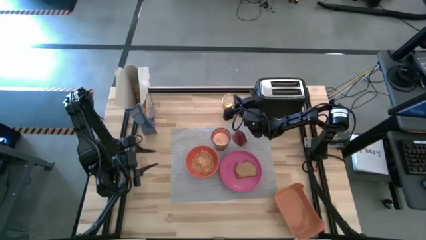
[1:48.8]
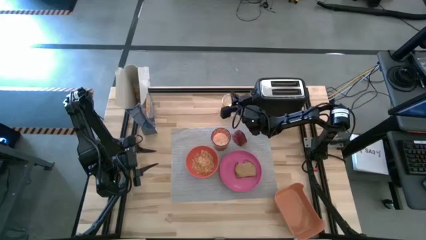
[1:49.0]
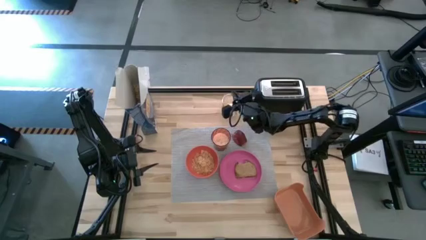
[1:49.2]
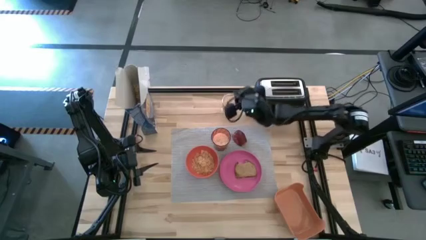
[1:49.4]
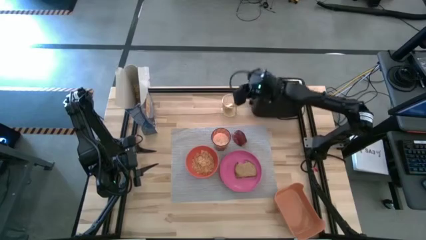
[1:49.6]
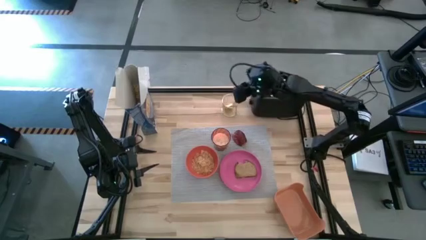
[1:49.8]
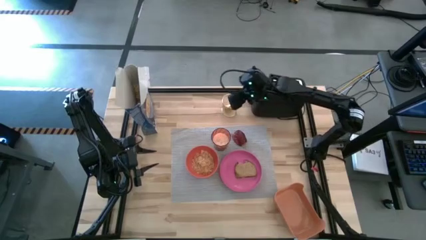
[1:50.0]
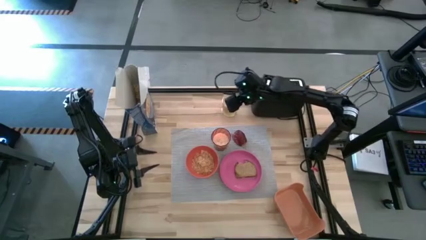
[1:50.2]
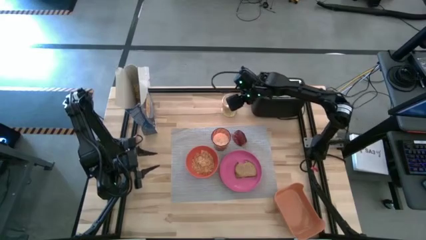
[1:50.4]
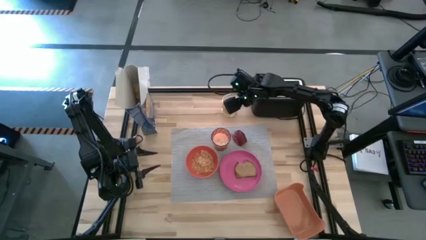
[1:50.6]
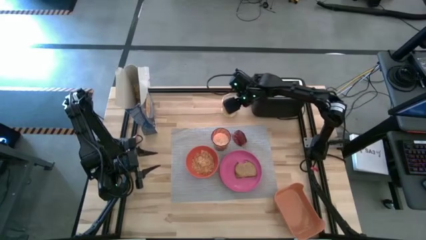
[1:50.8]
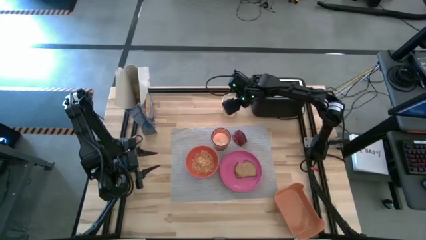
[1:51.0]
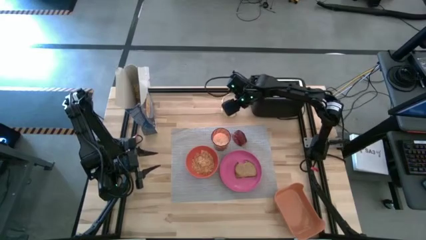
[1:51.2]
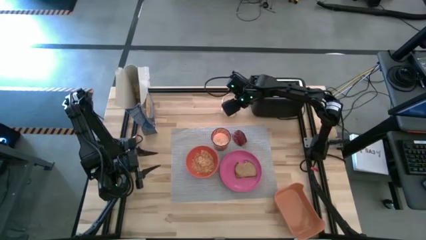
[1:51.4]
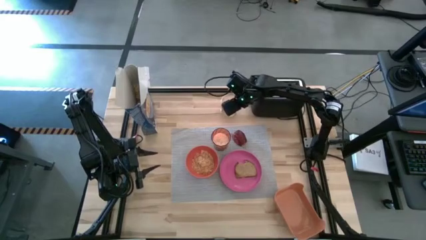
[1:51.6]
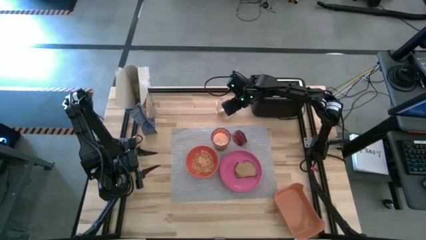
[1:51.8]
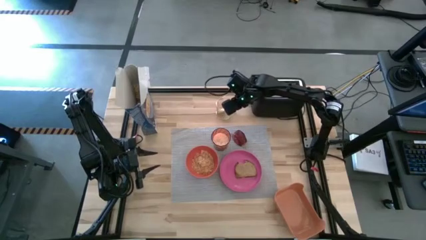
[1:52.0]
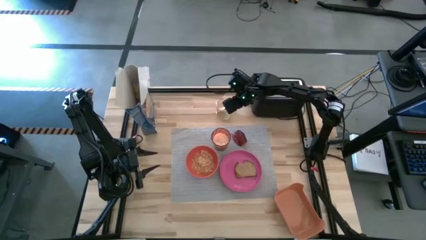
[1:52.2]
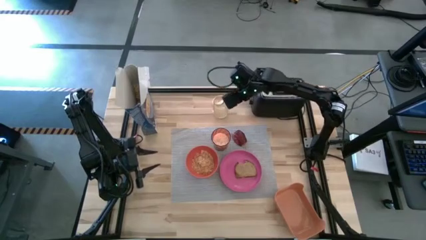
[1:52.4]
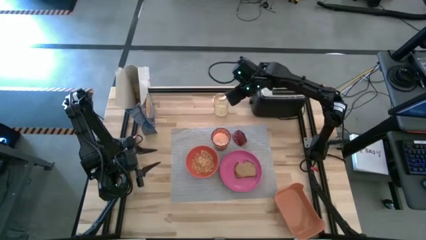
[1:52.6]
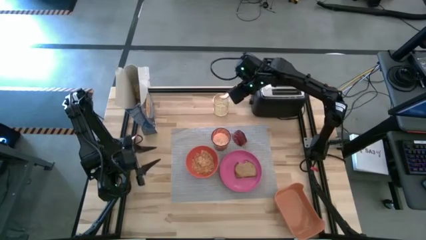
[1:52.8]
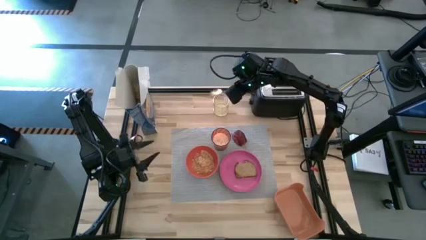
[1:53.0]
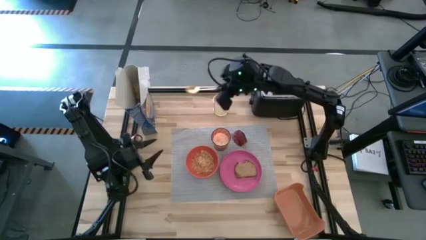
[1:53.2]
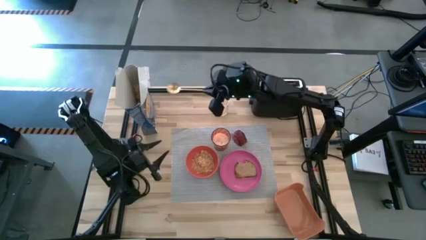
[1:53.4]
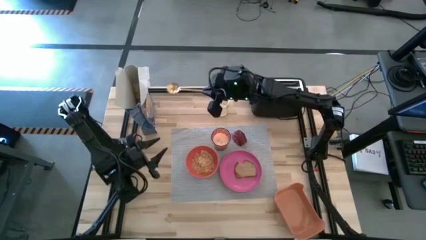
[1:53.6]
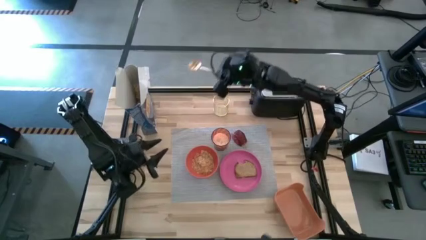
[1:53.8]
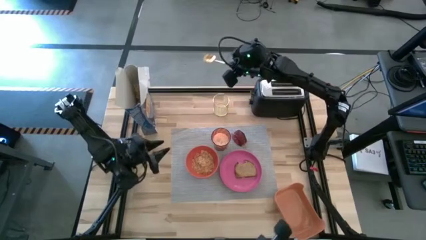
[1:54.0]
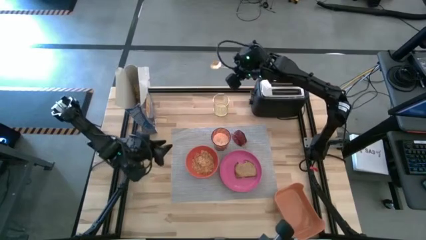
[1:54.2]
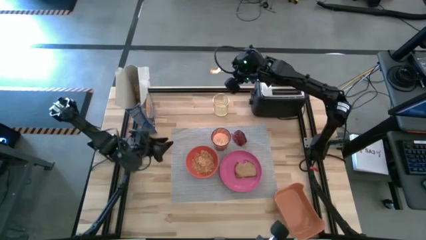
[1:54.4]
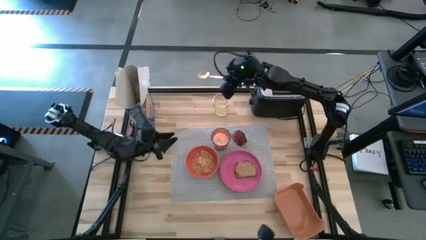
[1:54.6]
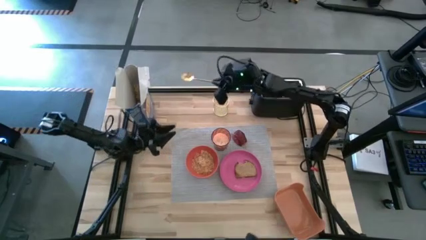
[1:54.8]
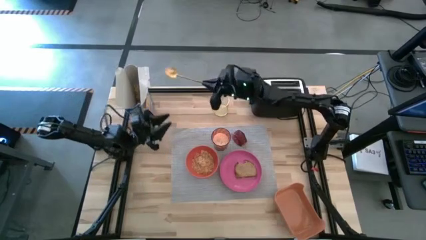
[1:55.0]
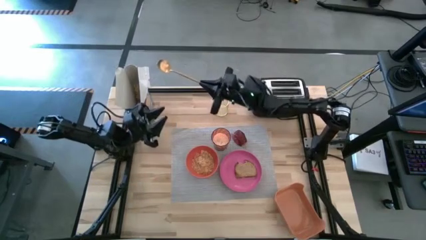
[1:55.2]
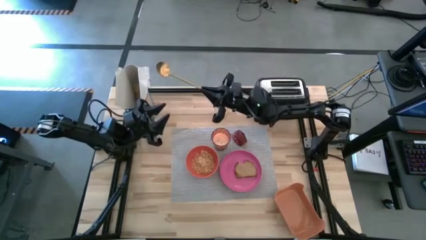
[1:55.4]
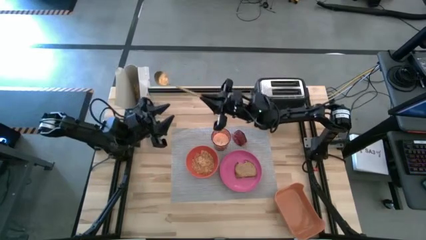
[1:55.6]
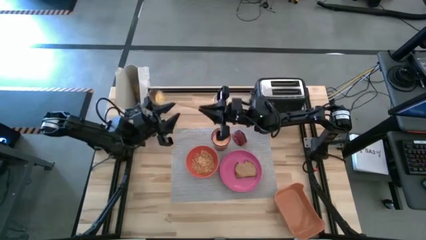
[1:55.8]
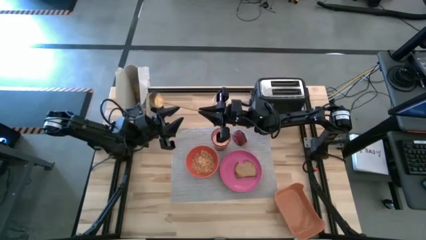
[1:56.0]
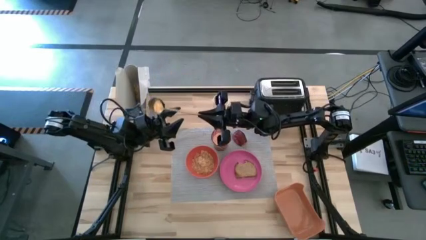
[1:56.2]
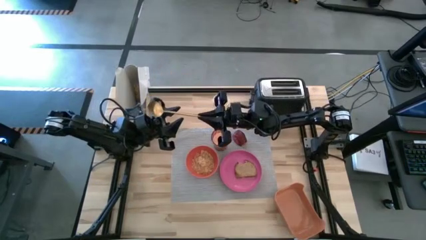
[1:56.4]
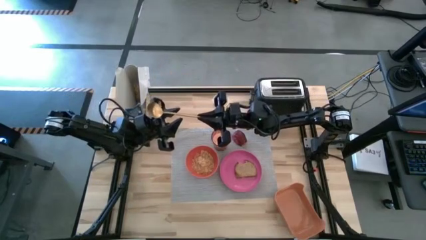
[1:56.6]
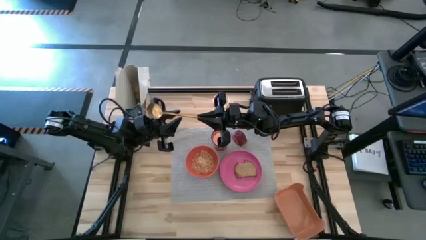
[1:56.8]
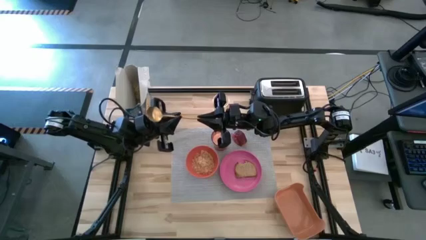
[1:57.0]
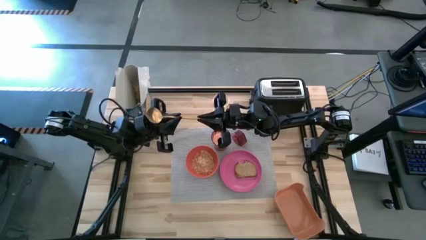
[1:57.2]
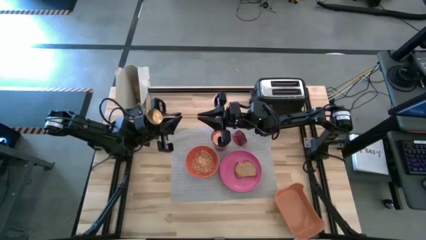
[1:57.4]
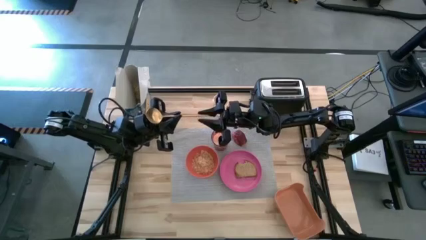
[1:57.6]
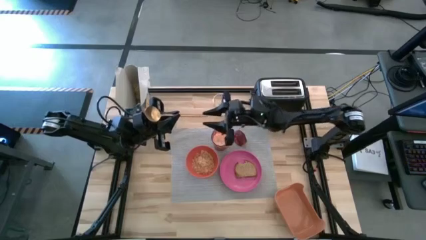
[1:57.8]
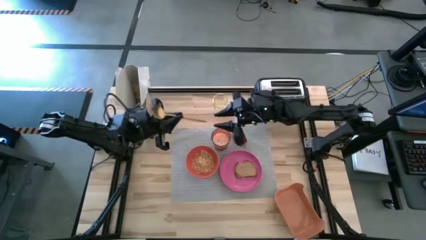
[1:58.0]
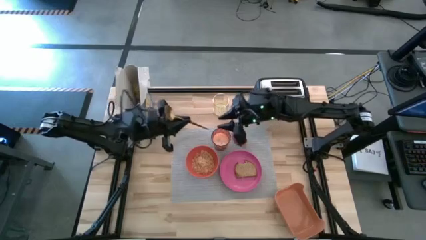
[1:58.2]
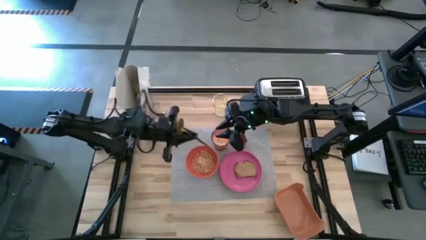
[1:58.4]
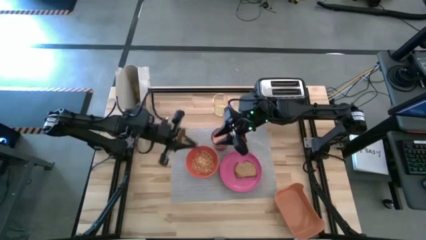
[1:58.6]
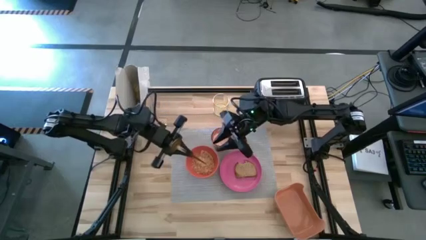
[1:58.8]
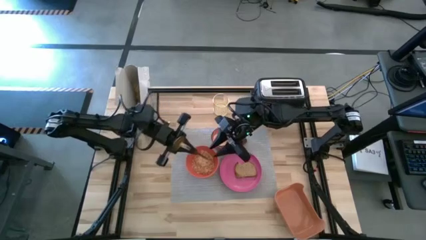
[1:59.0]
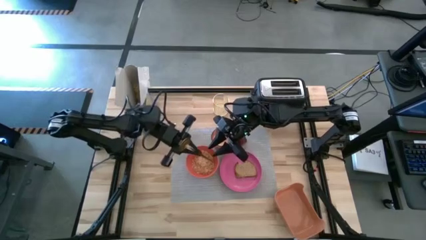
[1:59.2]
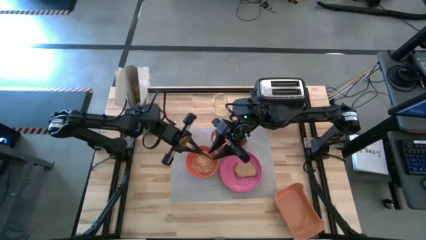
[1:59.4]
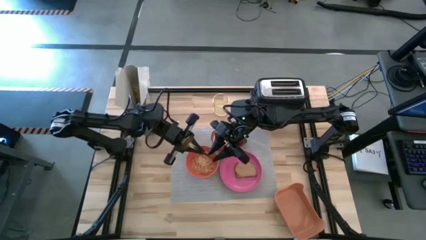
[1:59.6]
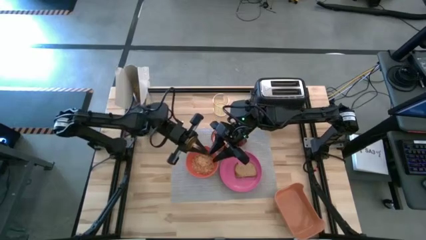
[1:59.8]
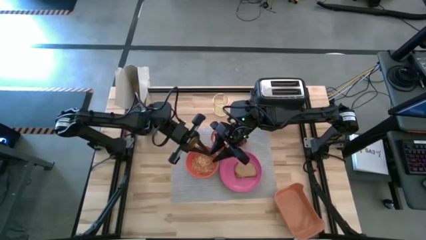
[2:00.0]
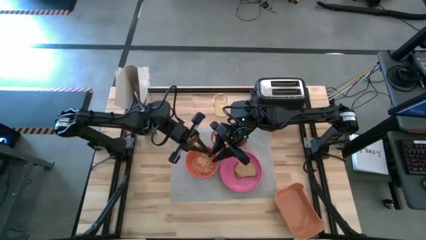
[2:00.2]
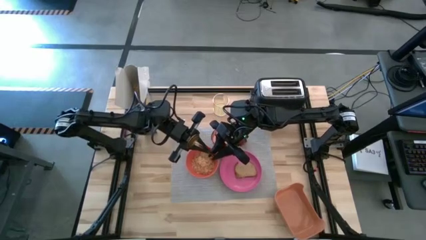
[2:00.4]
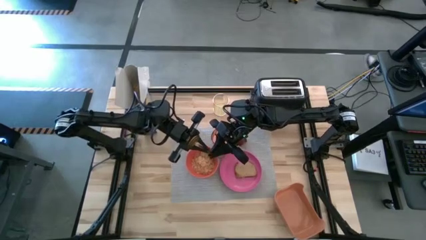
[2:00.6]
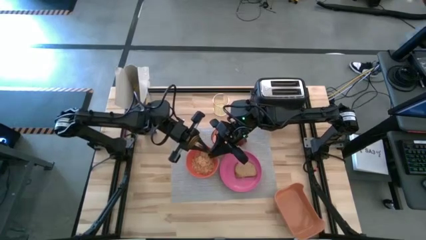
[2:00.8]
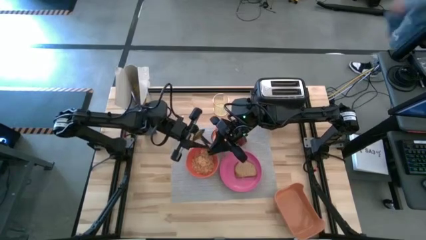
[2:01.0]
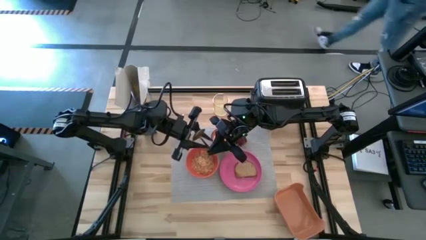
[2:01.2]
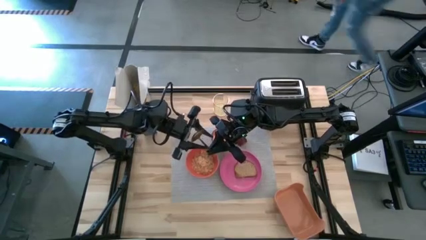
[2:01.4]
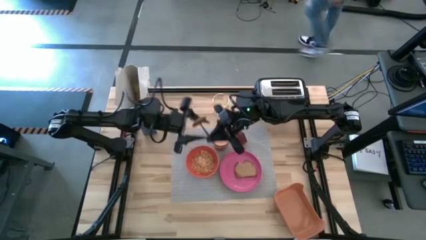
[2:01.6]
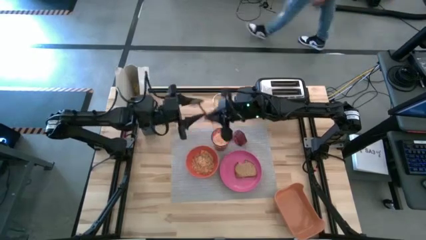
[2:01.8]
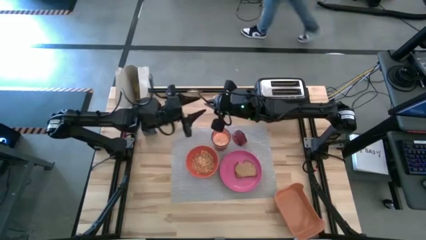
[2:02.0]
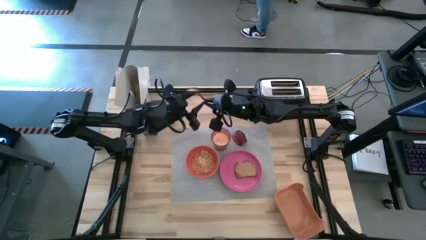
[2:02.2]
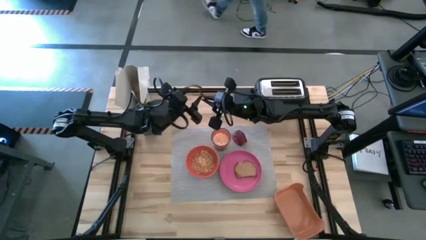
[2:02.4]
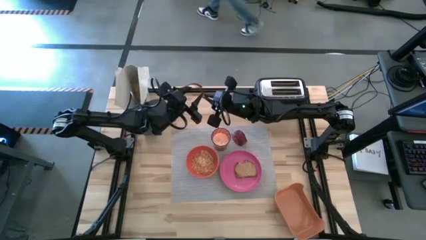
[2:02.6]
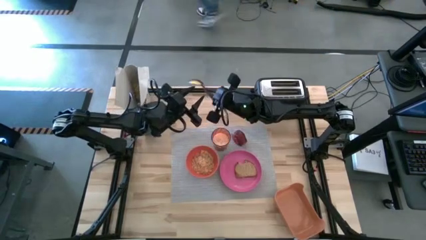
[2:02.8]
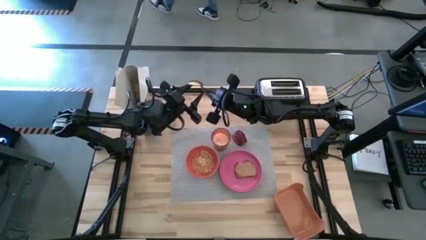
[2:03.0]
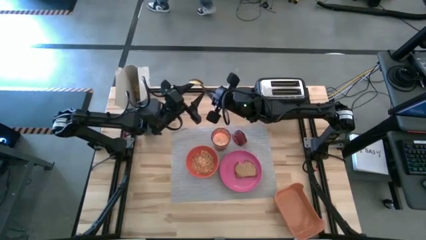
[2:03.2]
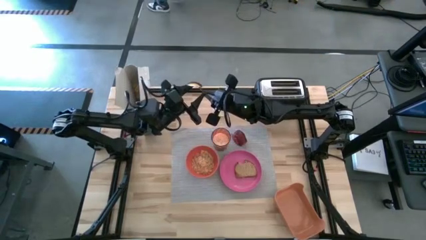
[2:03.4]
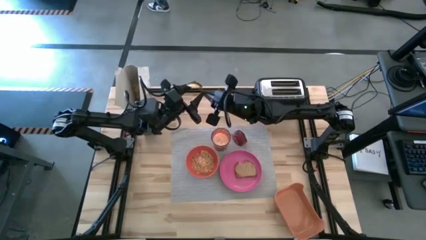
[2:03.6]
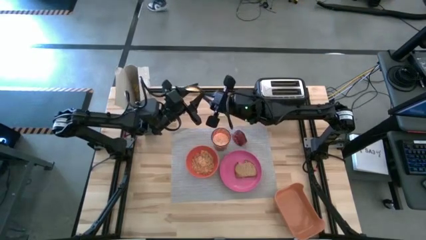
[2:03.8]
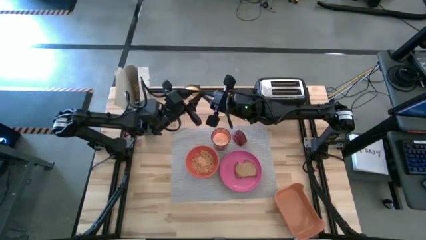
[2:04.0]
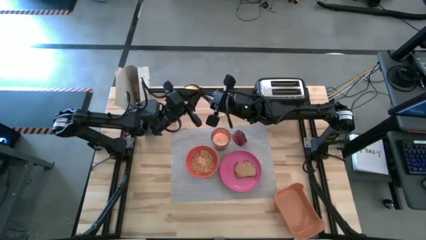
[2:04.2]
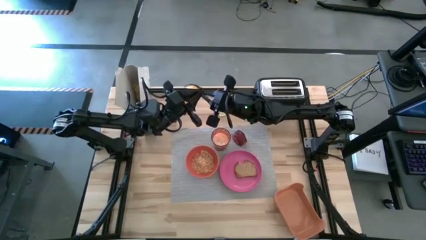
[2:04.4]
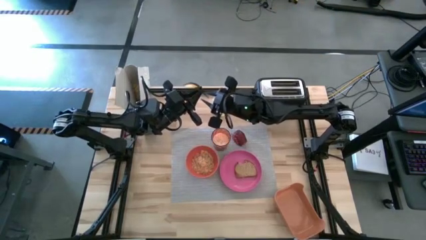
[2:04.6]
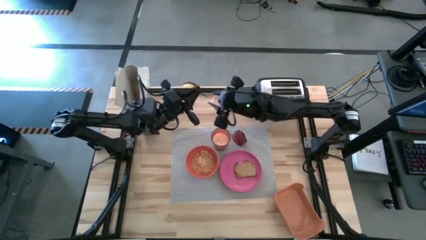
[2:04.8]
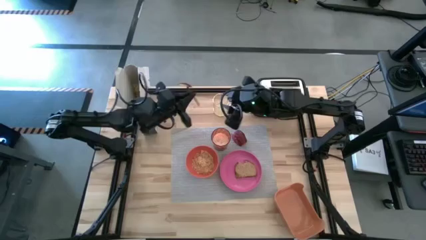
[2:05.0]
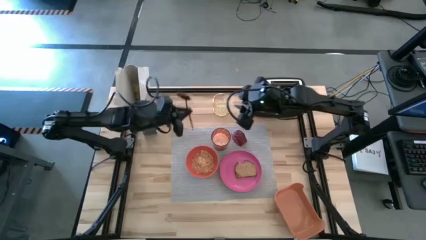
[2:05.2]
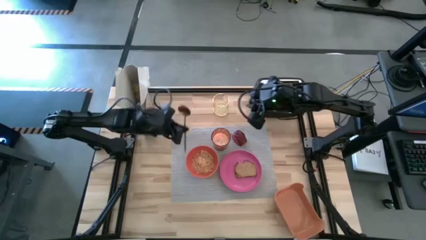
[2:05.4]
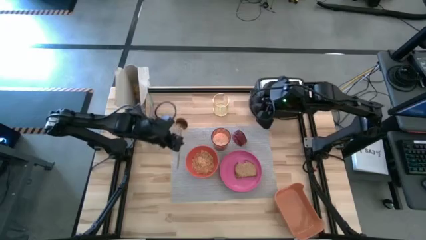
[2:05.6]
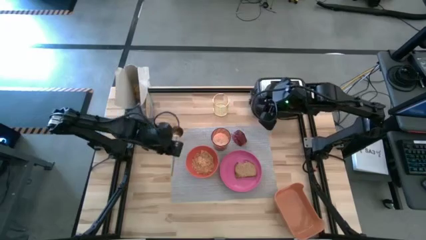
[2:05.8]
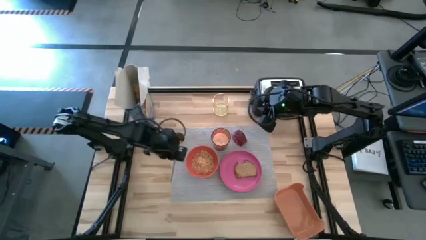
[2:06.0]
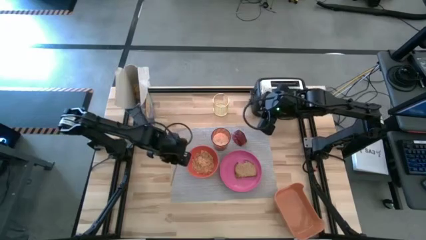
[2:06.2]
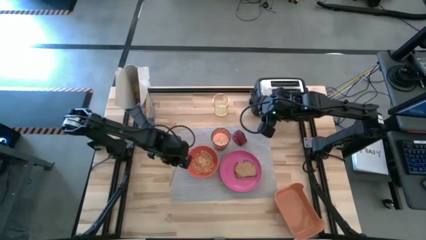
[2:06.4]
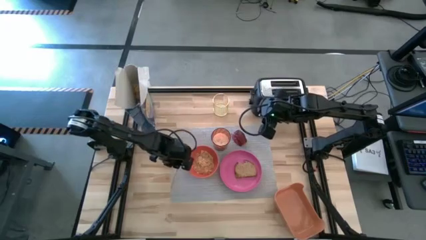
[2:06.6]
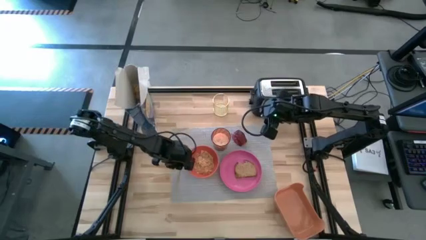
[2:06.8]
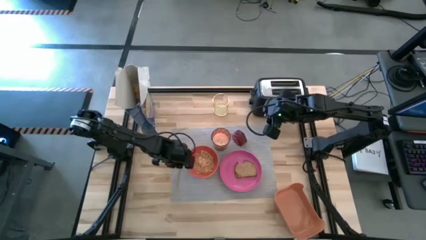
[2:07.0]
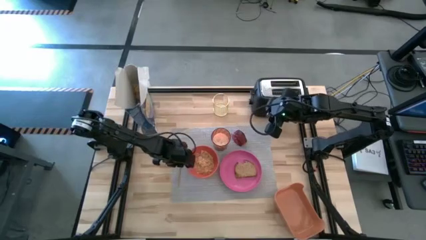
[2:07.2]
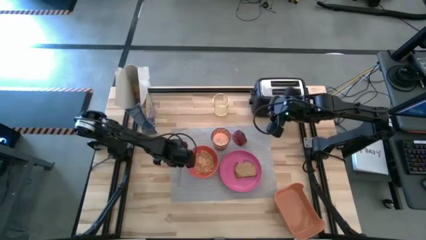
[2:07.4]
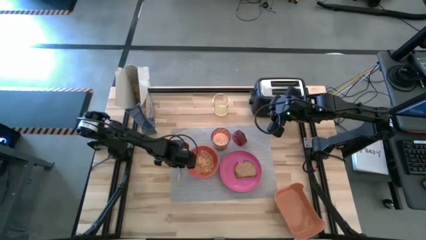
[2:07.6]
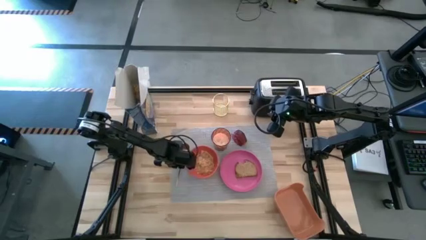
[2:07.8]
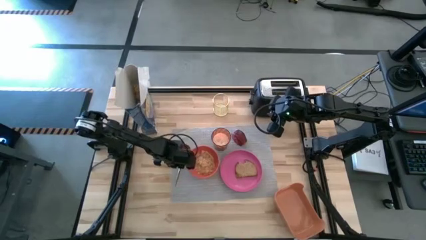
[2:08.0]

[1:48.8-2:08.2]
Task: Arrange a breakfast setting
Put the gold spoon on the grey tablemat to the left of the orange bowl
